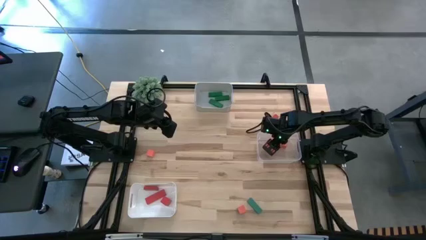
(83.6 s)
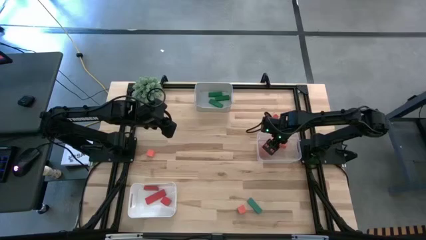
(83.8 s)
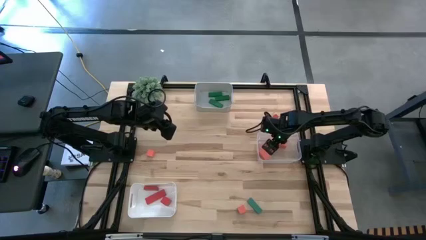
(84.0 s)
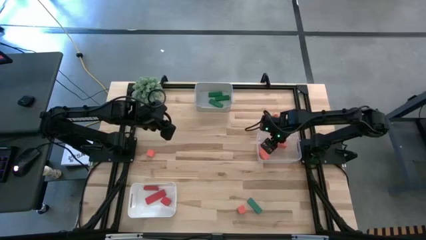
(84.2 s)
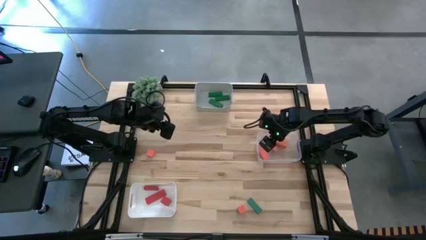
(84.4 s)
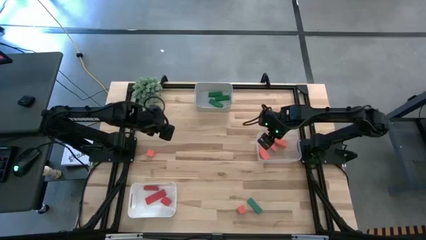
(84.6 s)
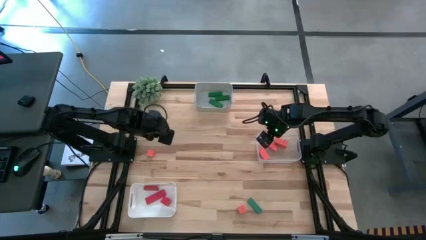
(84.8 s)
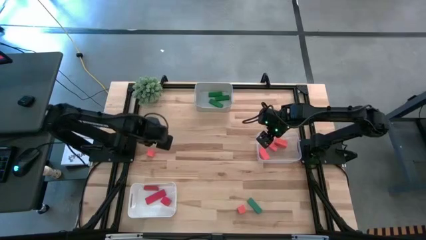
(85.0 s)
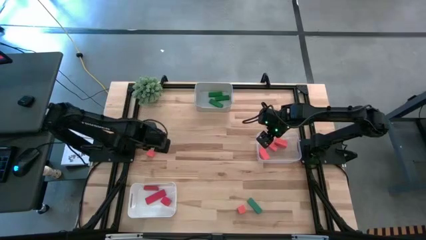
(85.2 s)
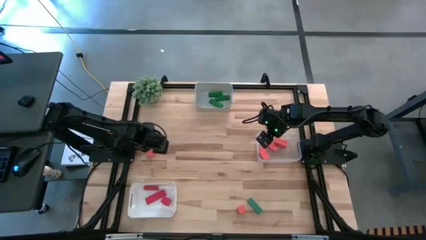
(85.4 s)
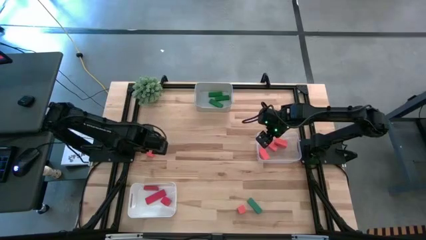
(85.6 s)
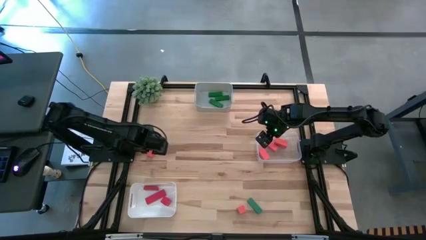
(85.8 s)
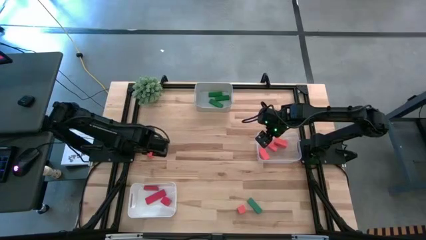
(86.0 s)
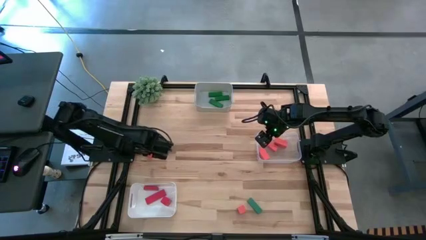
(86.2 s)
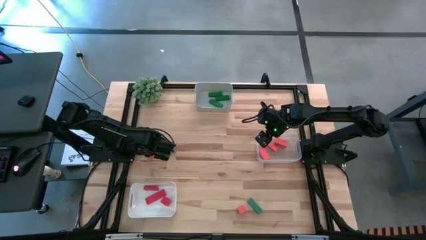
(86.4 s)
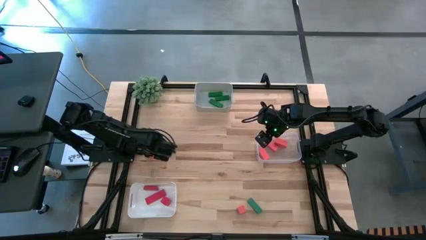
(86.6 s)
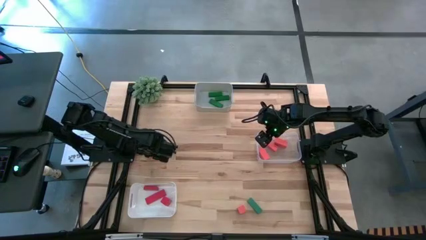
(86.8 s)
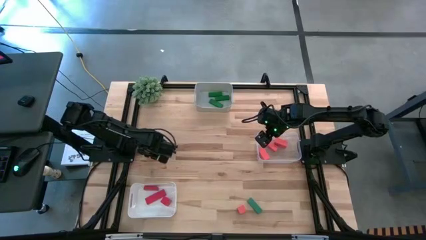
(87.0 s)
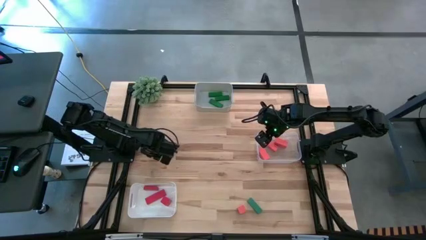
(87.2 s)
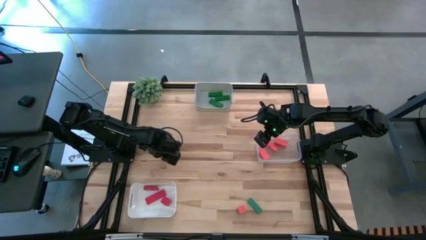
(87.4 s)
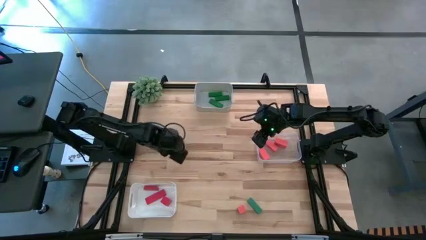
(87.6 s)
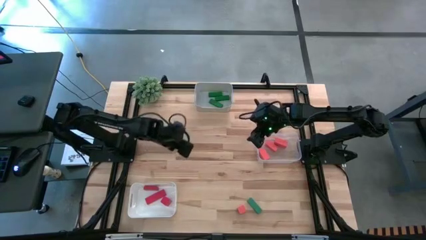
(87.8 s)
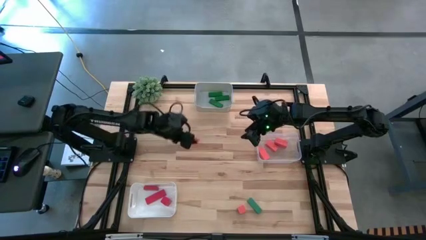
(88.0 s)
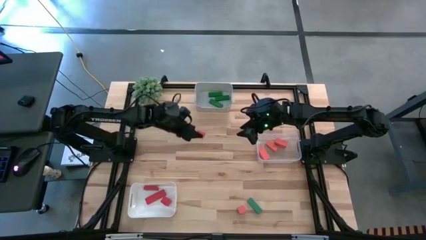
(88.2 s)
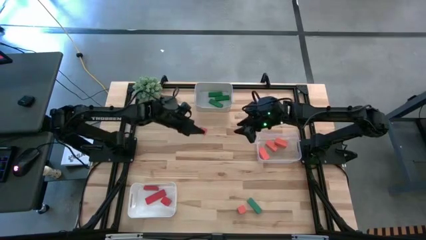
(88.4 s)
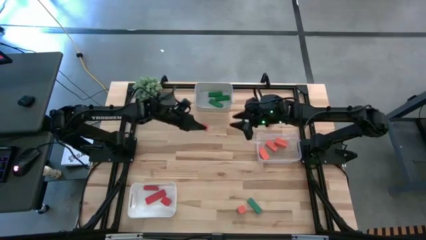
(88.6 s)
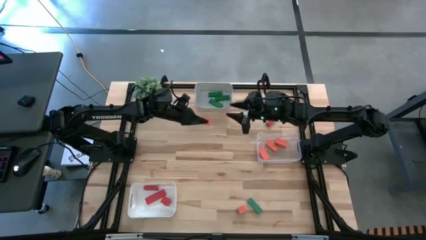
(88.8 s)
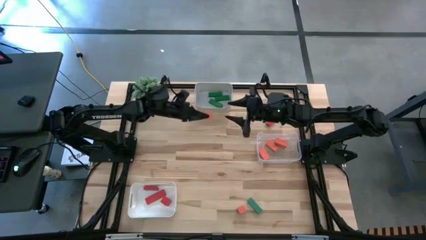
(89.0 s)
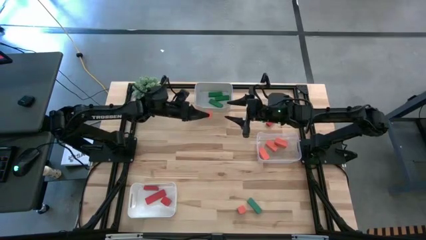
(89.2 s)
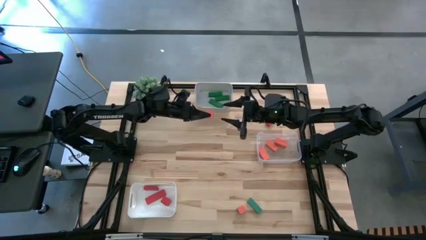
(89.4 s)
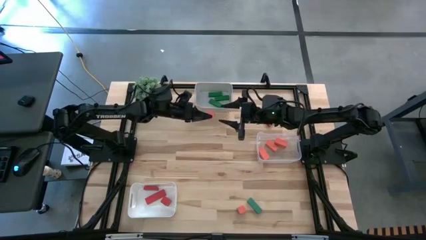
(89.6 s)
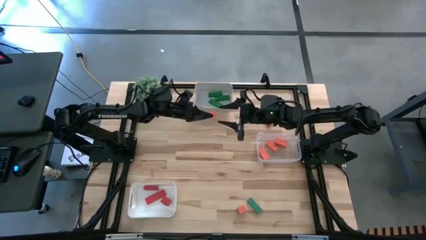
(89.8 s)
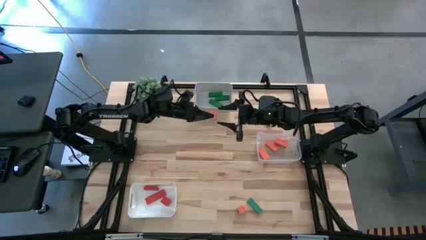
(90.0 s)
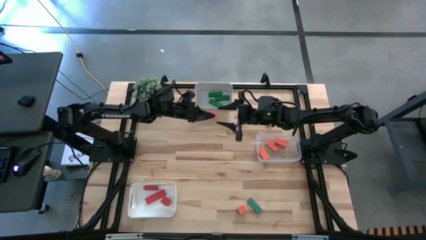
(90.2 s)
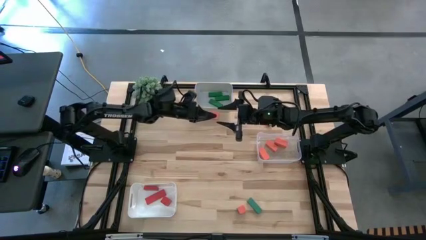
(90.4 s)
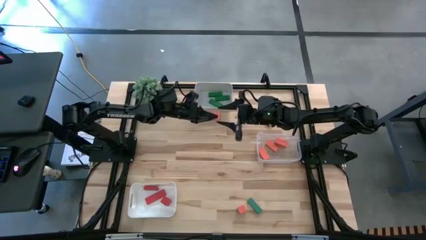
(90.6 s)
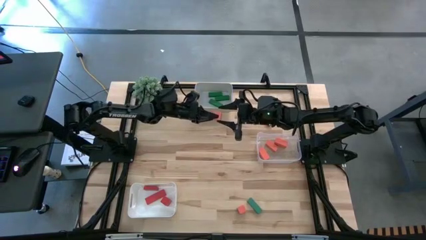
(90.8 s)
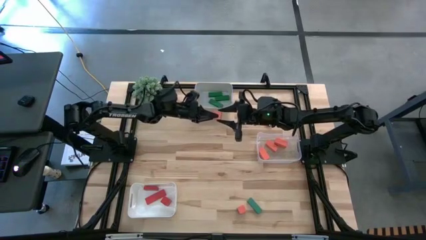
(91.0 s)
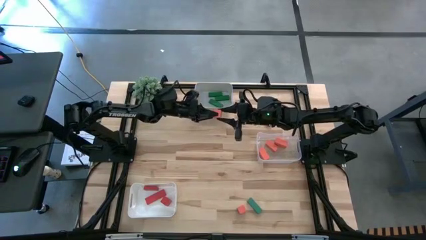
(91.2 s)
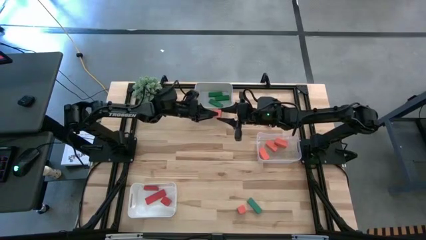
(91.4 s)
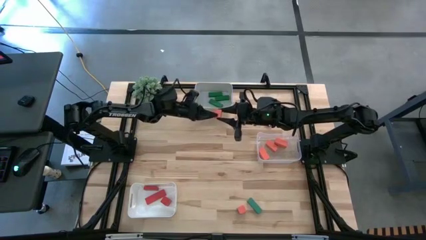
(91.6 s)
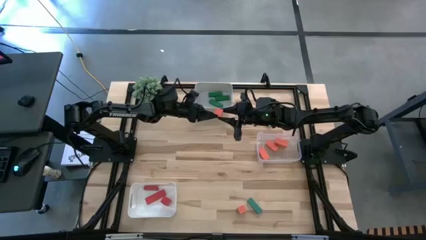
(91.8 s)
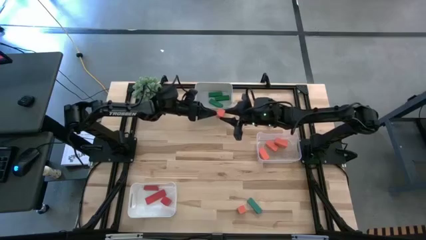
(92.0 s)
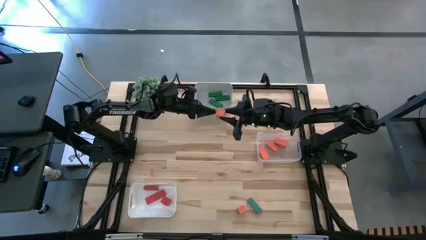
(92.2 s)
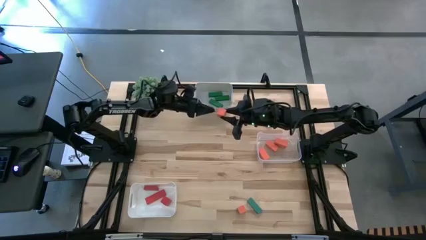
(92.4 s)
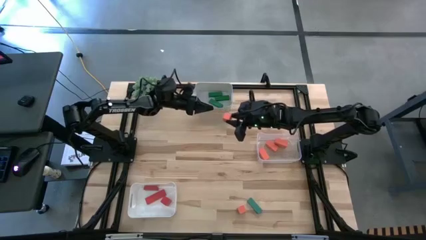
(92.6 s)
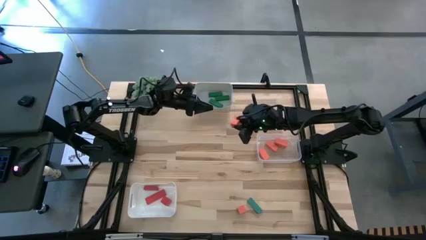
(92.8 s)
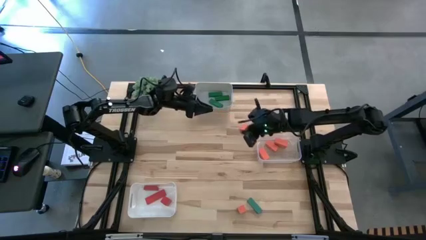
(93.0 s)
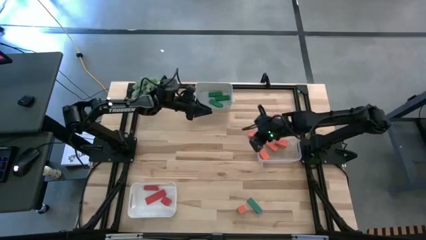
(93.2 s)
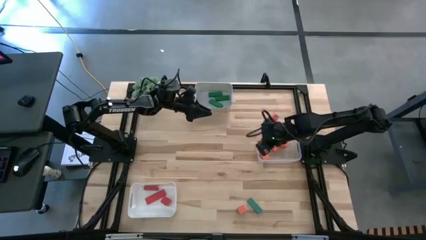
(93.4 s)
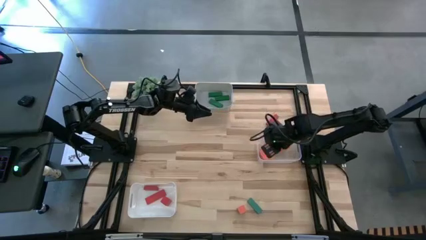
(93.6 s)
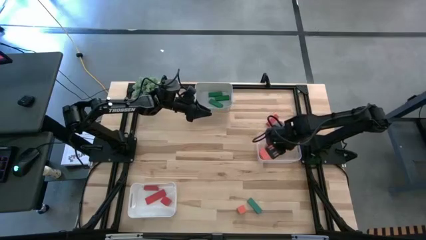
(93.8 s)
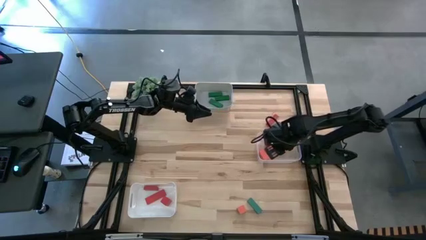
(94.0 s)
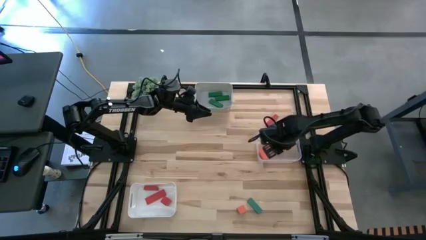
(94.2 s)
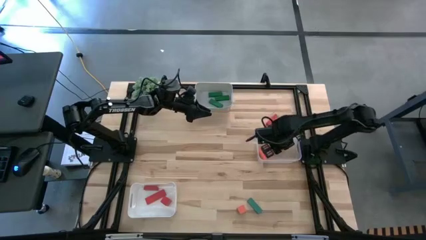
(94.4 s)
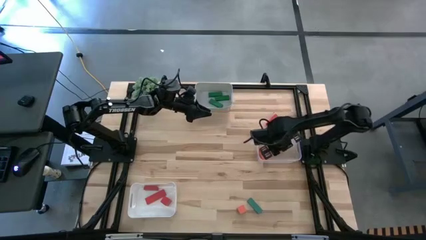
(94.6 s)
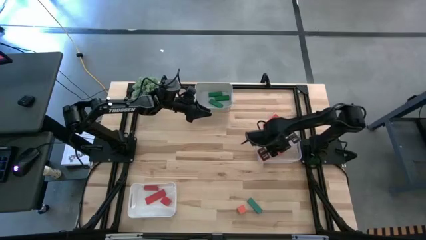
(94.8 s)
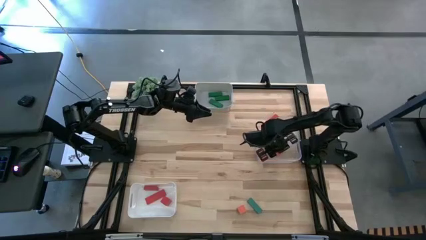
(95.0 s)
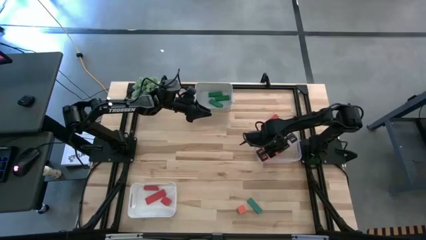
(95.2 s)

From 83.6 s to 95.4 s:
Task: Sort & place blocks by color
Put the orange block into the transparent bin

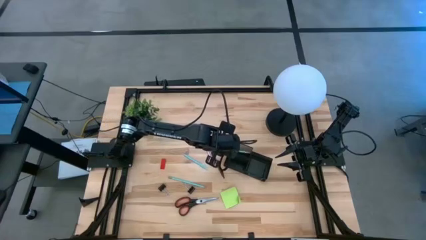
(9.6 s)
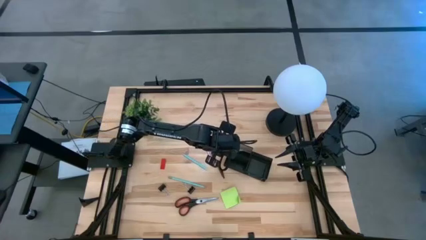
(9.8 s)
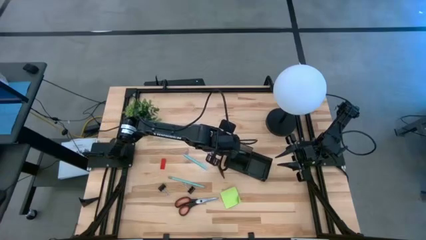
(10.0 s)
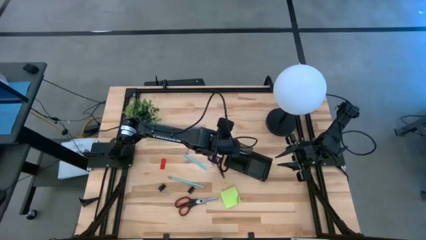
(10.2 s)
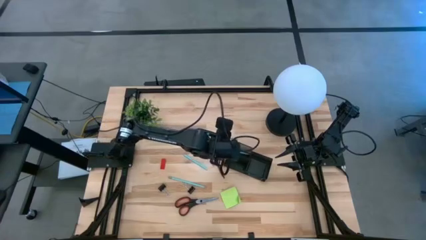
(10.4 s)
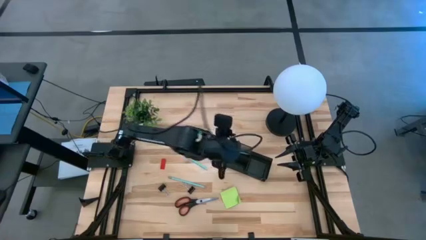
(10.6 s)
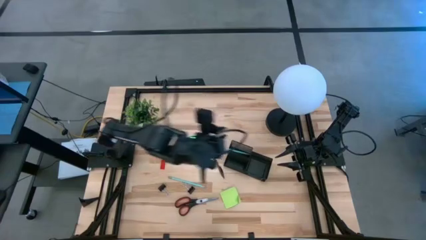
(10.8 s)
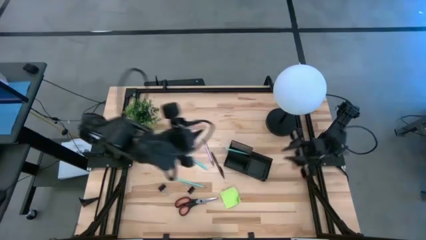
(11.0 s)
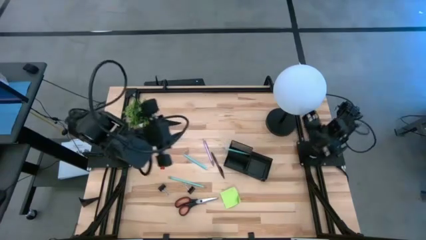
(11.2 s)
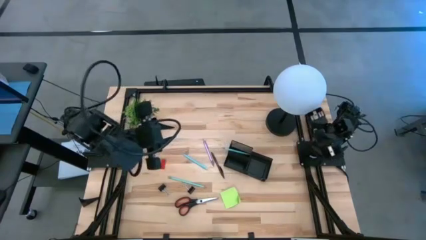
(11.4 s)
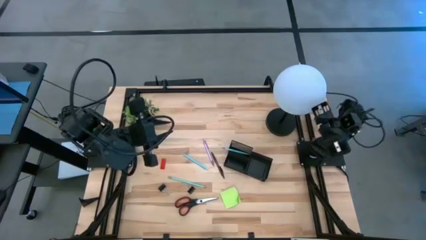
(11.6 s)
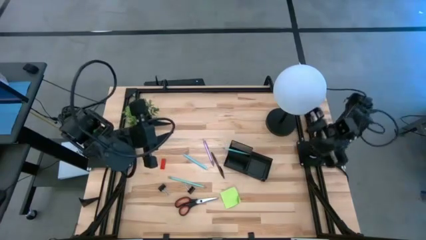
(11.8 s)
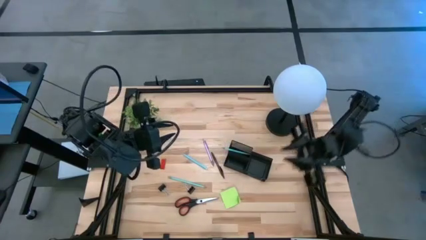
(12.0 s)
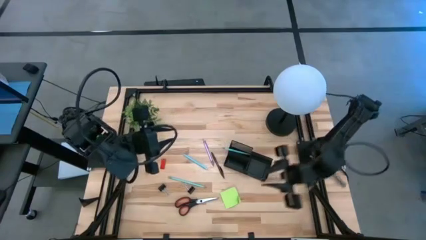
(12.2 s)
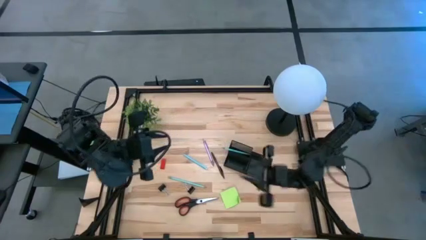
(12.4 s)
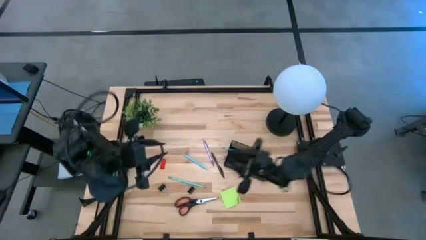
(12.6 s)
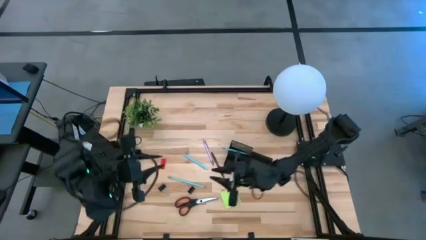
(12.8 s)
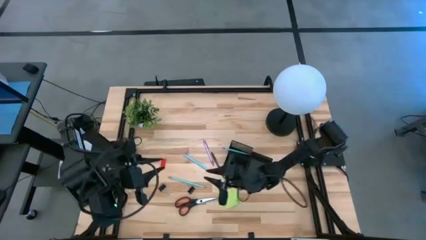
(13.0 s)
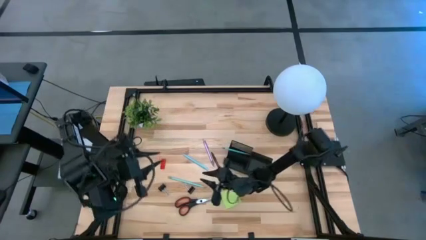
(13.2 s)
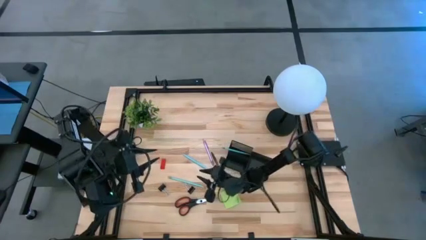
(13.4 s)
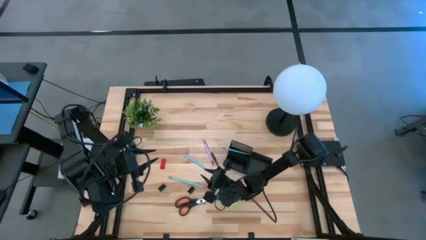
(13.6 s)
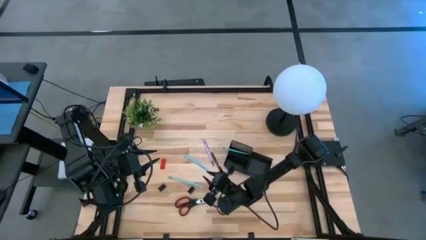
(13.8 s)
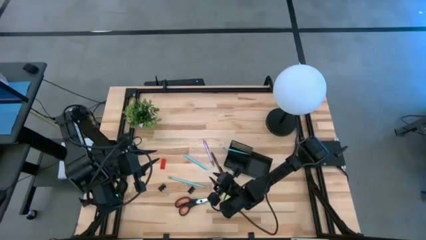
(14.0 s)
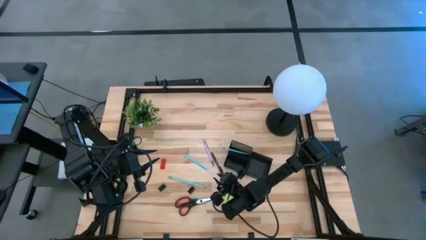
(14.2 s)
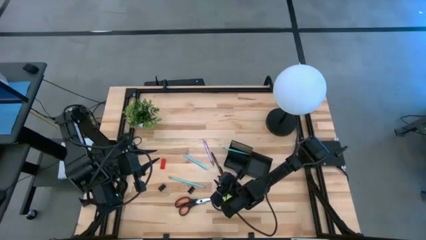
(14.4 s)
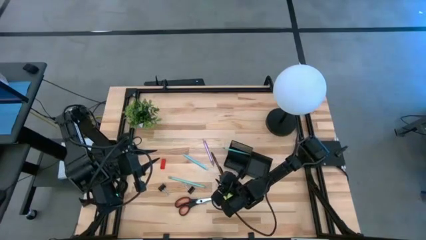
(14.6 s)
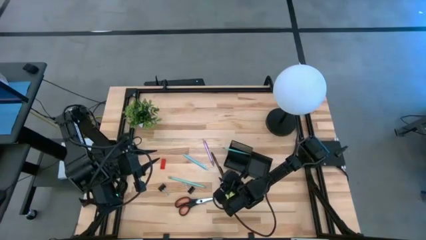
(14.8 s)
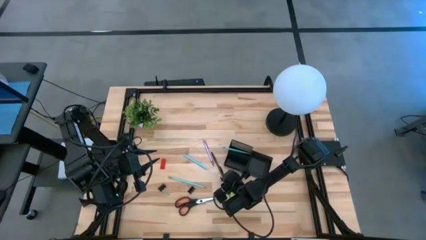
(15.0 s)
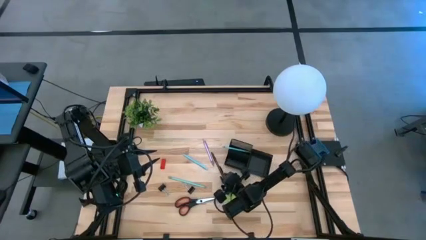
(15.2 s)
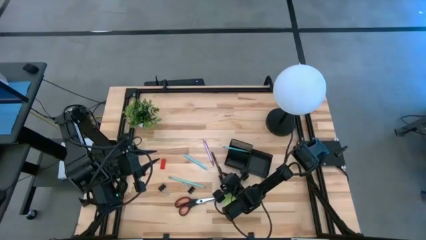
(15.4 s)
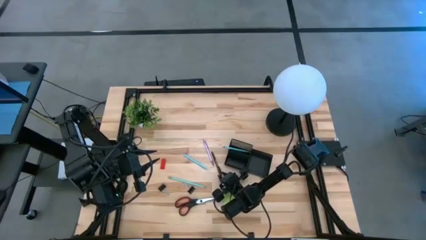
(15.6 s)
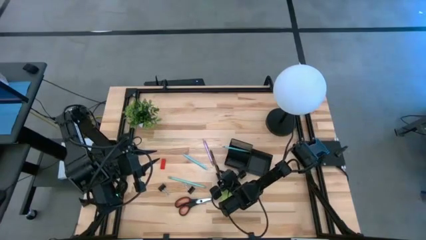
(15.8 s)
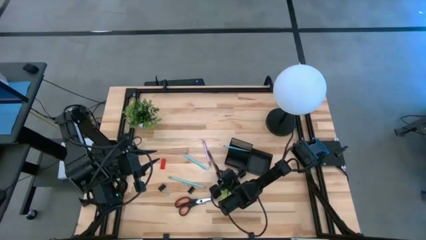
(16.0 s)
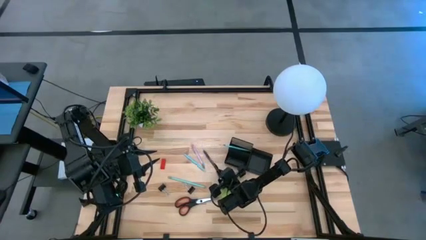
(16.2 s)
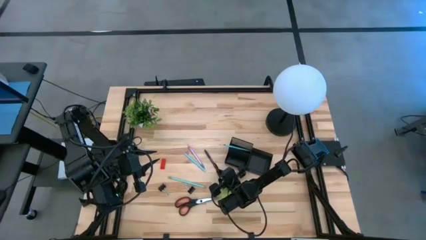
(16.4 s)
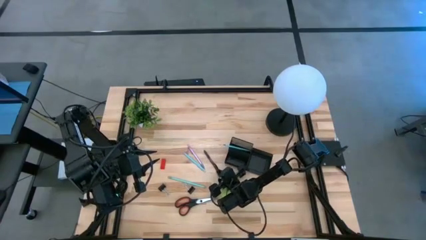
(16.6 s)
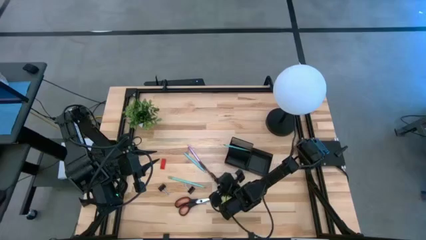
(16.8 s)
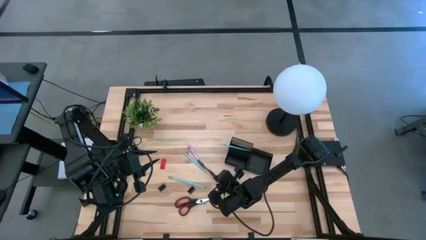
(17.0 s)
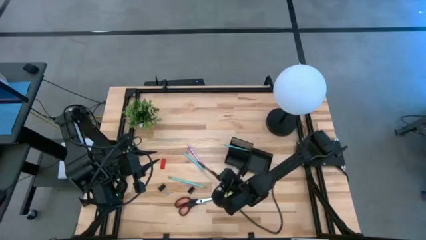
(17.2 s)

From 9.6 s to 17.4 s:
Task: Pick and place office supplies into organizer
Put the brown pen into the desk organizer
